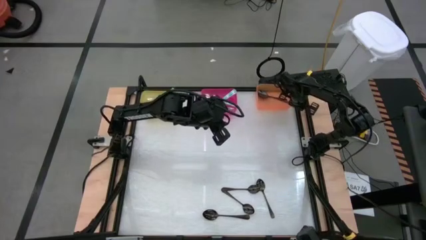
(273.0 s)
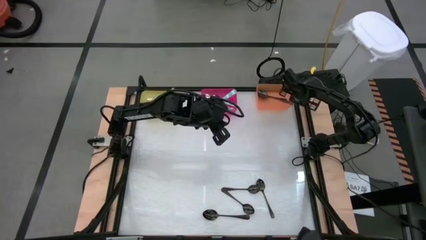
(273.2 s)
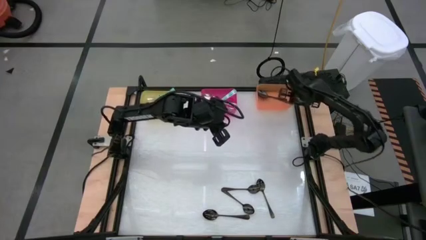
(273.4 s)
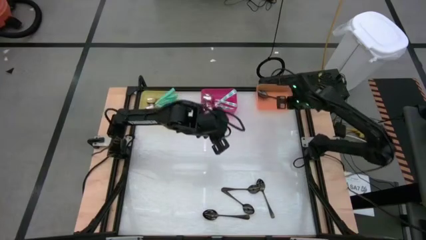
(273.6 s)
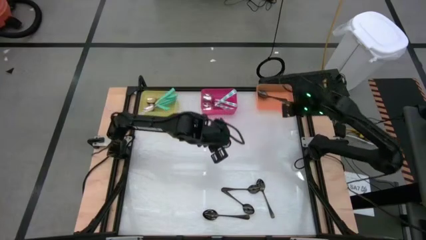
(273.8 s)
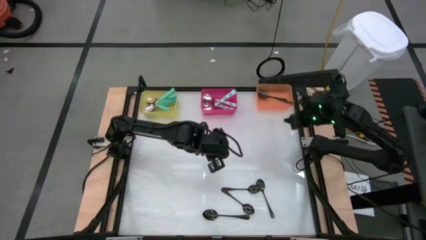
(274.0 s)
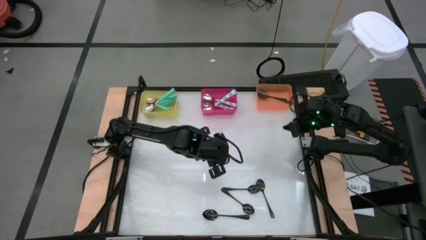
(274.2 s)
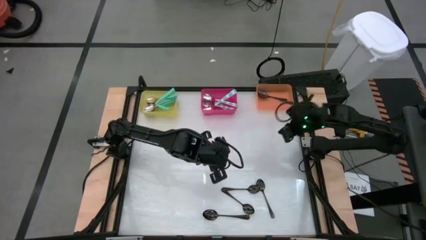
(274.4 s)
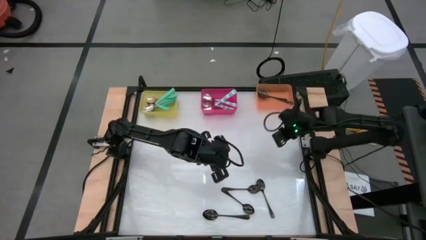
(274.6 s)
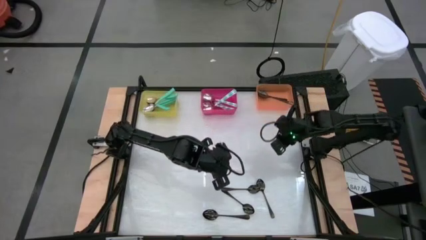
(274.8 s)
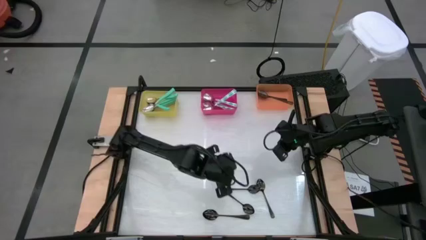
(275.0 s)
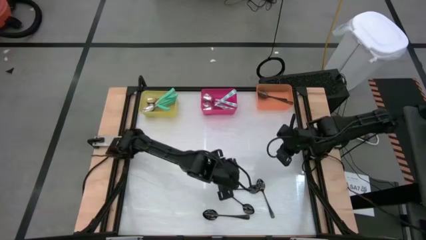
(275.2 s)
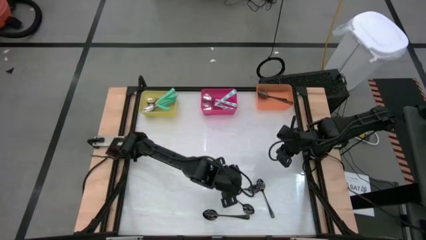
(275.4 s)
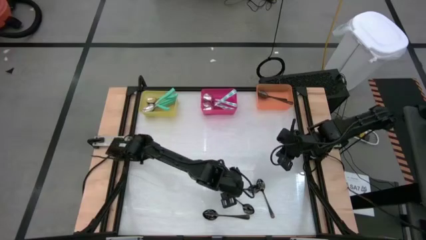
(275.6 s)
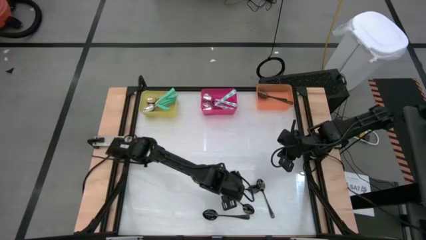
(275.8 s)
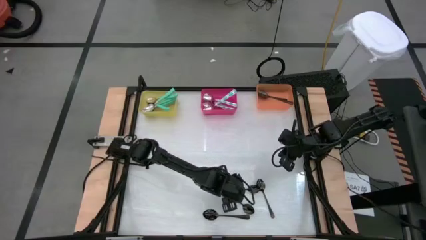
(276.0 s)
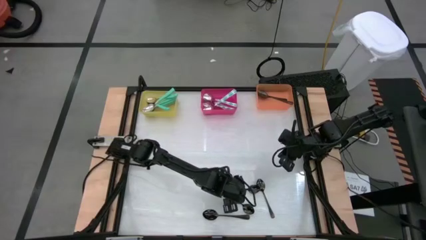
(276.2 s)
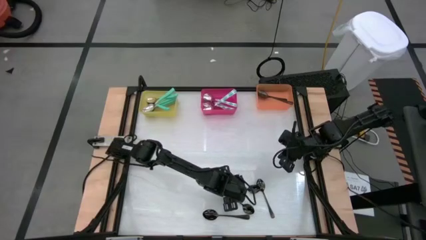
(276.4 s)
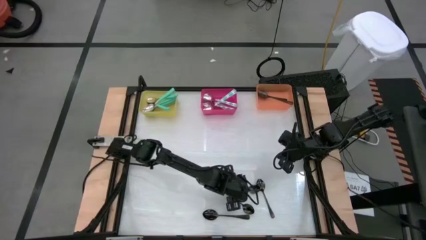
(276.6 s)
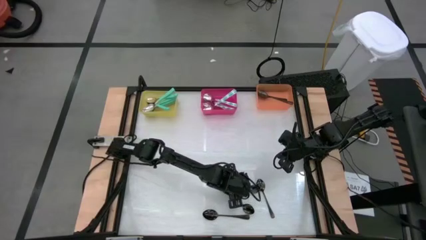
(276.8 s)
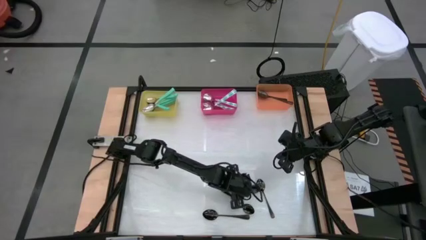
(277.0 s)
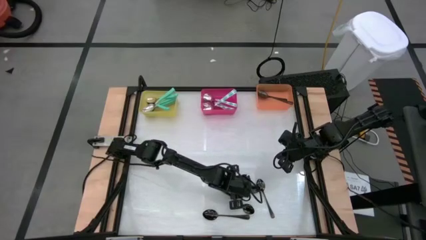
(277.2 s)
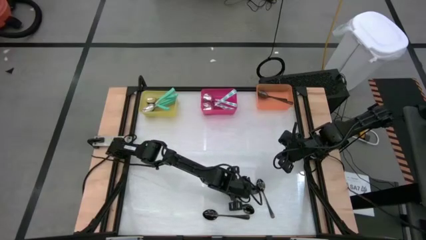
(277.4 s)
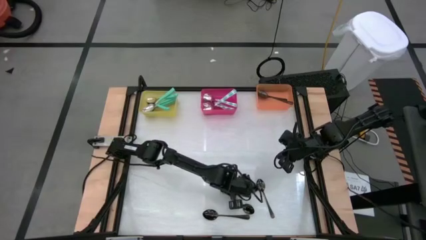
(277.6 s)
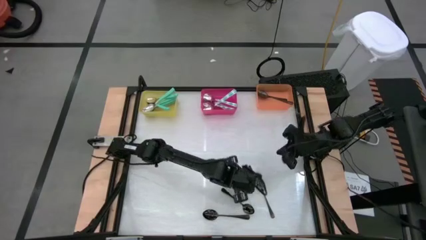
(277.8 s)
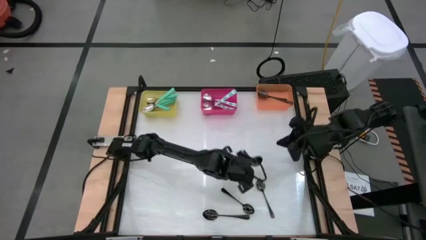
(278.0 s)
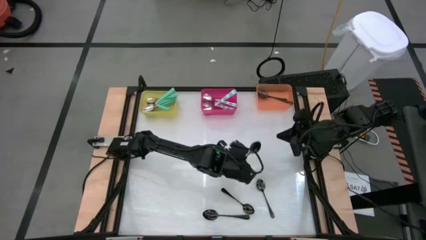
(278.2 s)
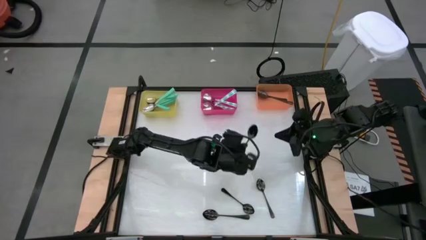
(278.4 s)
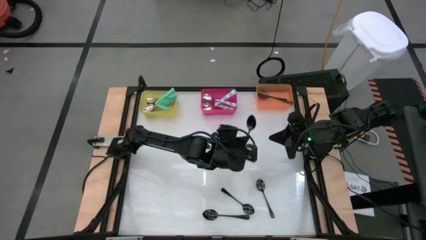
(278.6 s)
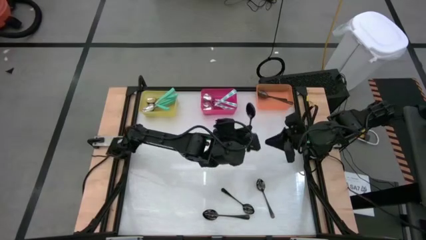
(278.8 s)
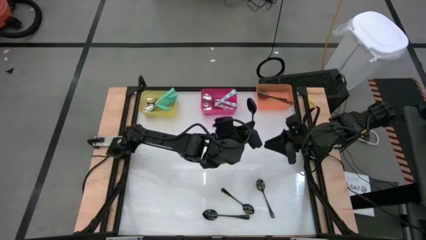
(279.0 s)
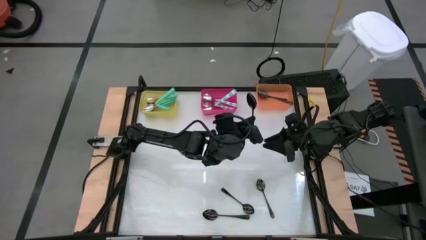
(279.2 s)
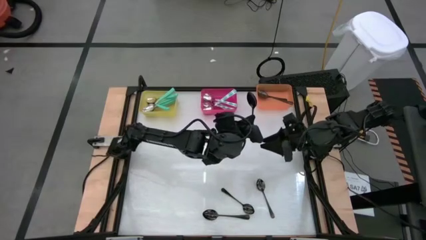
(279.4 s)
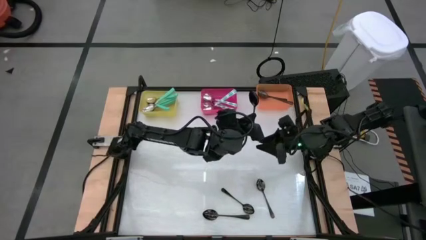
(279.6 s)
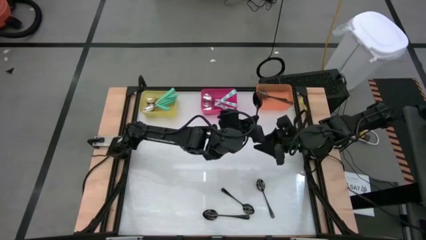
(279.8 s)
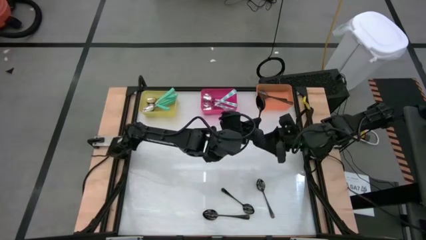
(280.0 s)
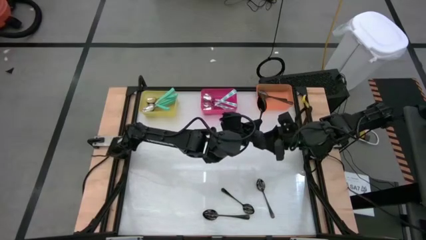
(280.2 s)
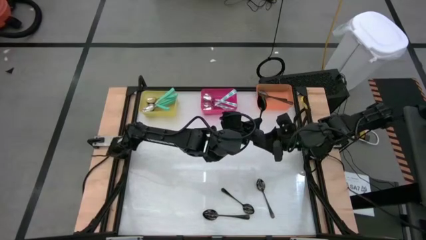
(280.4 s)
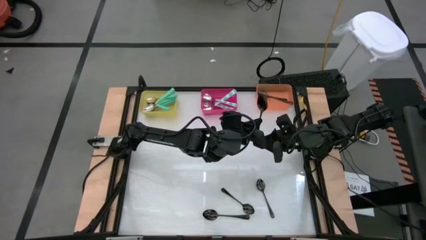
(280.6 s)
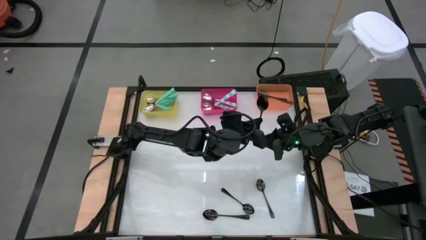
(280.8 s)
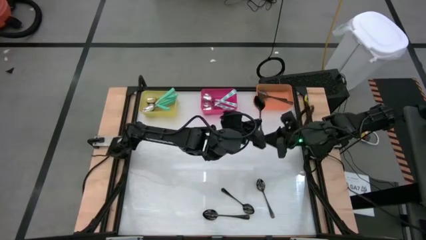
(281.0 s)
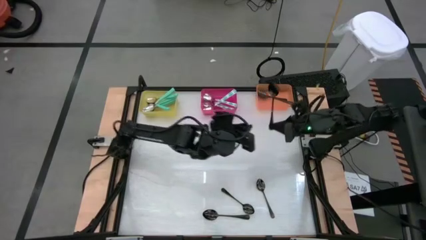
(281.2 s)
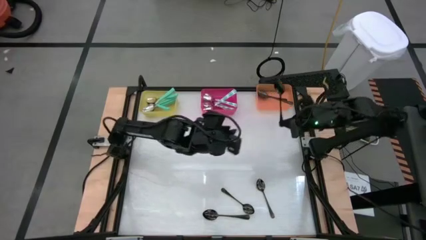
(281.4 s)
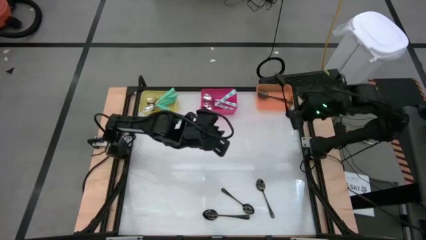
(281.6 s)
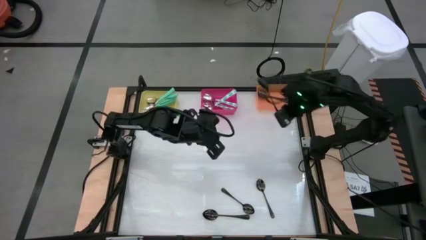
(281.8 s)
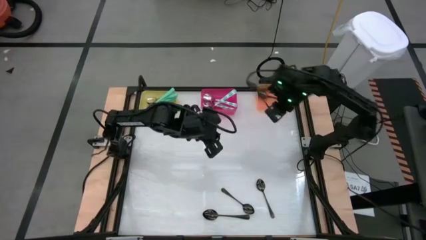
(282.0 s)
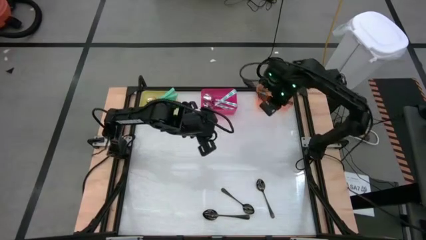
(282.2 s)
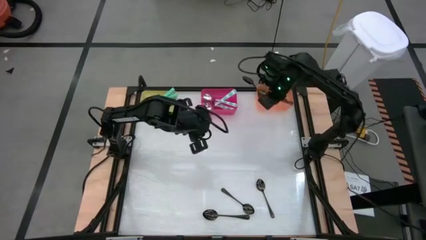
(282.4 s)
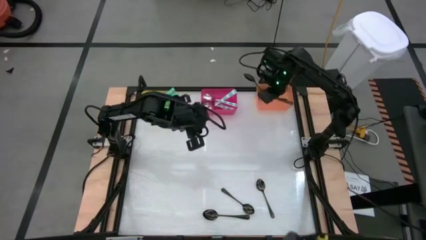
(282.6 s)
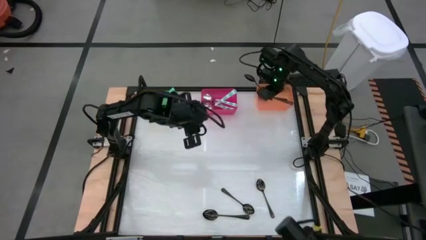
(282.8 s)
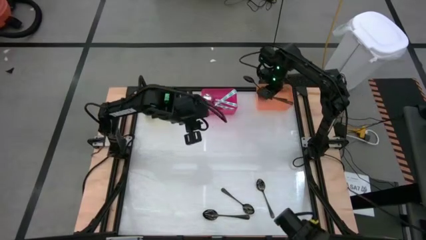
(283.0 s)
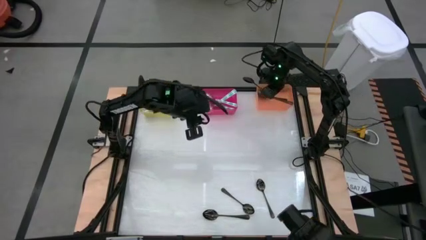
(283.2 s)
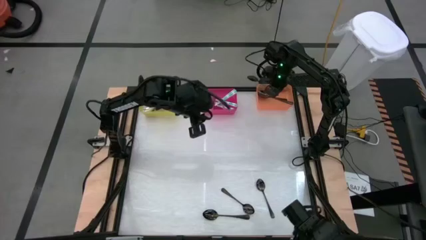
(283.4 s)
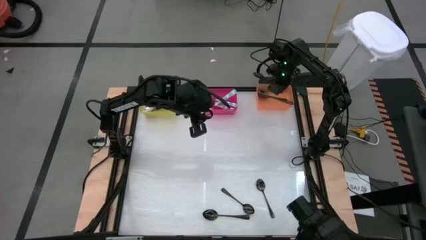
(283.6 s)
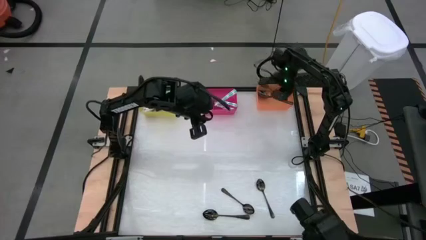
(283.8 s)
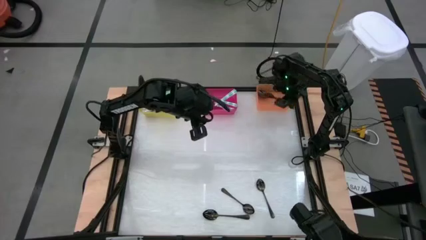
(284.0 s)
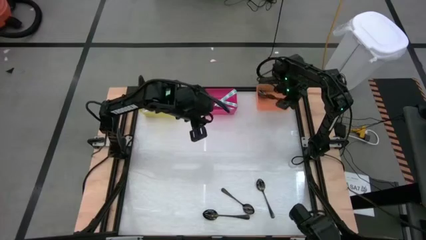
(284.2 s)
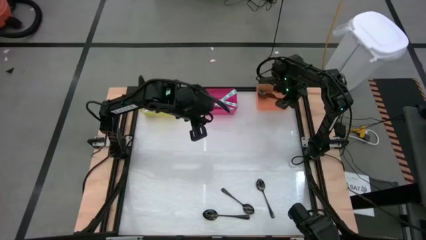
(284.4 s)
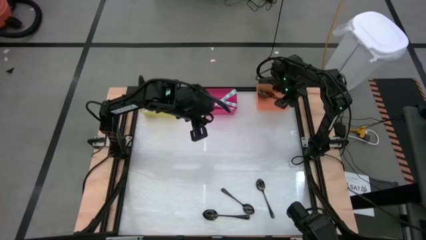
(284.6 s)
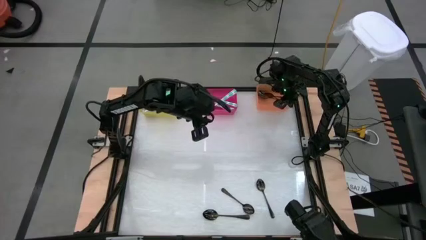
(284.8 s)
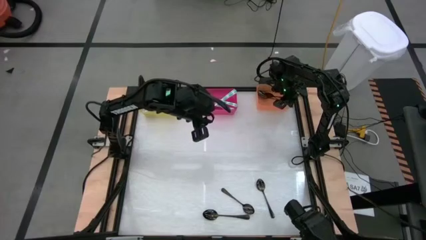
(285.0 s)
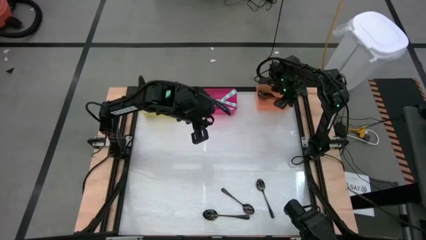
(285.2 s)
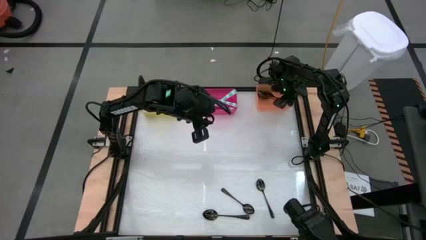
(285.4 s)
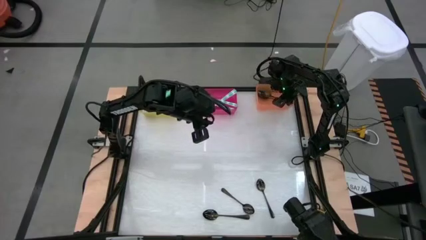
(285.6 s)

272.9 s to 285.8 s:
Task: Sort silverware by color (type)
Put the black spoon into the orange bin

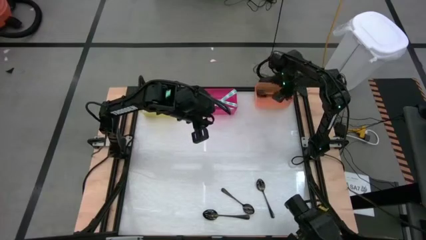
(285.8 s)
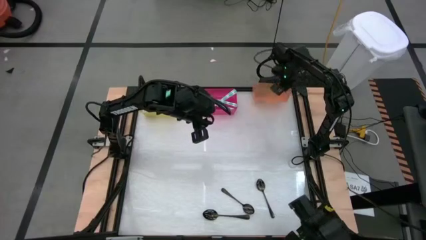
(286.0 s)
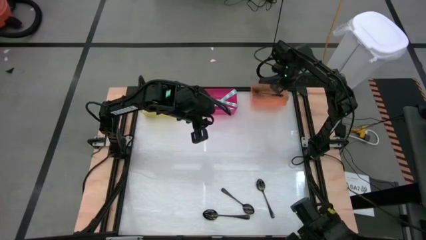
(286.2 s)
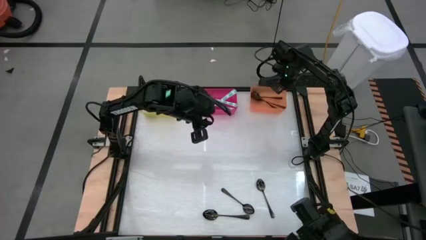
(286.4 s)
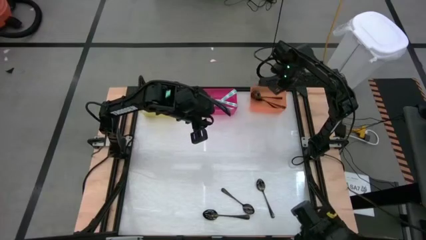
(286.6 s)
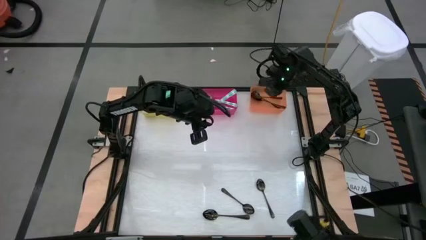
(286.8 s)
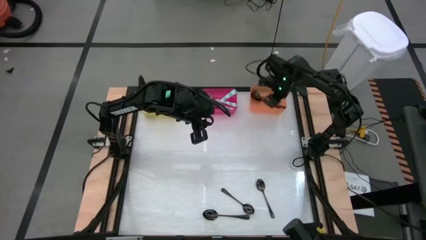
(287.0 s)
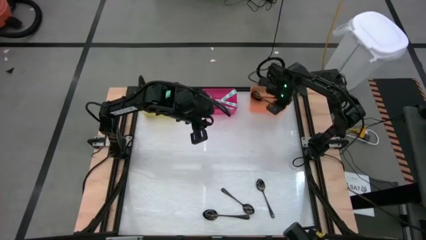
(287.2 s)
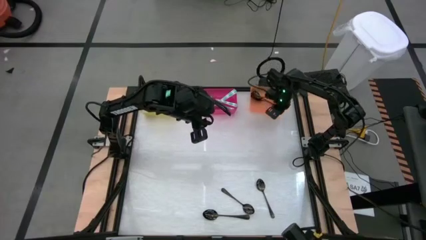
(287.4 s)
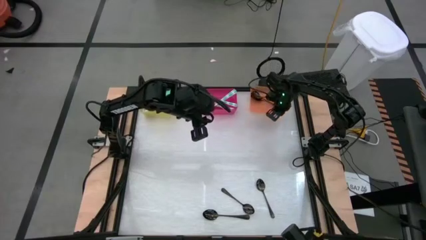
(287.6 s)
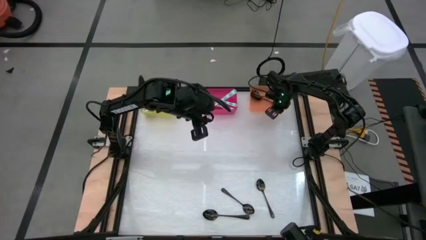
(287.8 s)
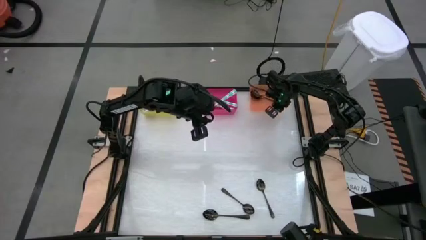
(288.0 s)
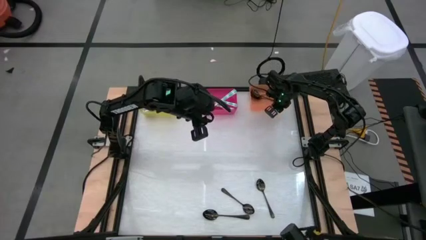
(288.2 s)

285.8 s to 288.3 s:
Adjust the orange bin
